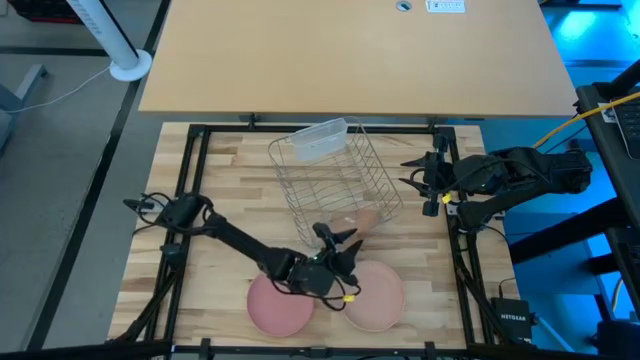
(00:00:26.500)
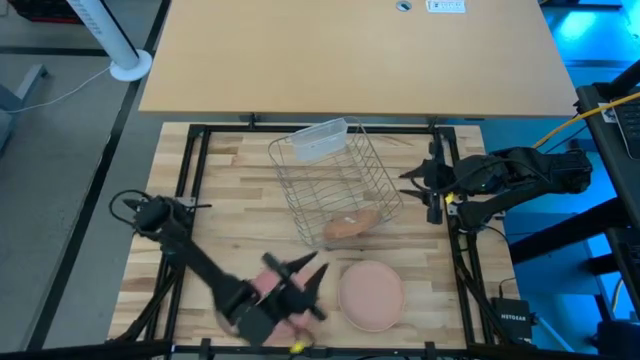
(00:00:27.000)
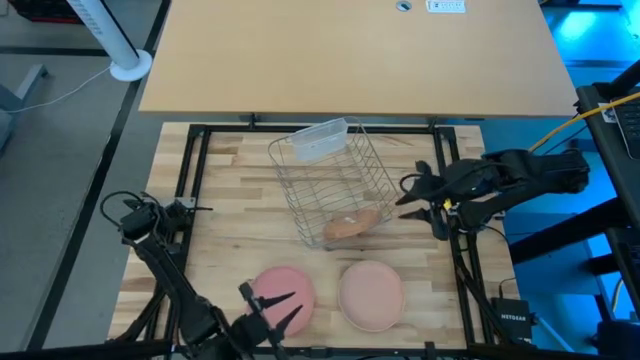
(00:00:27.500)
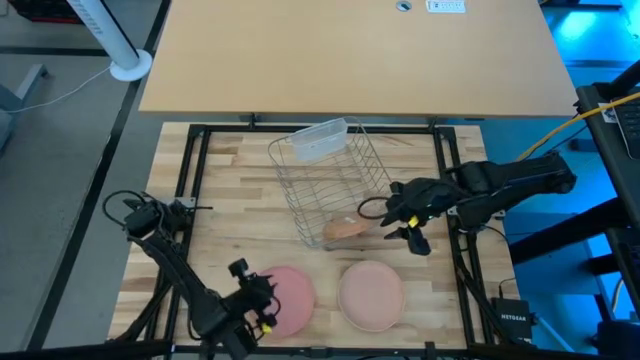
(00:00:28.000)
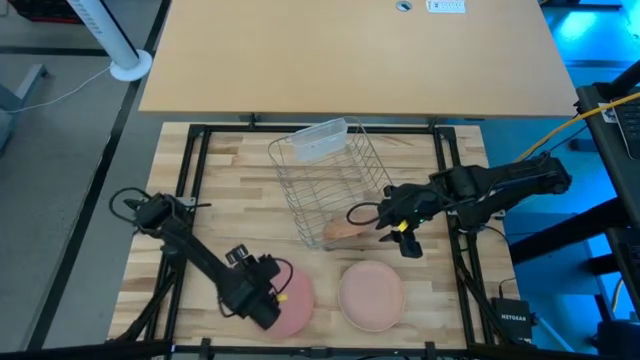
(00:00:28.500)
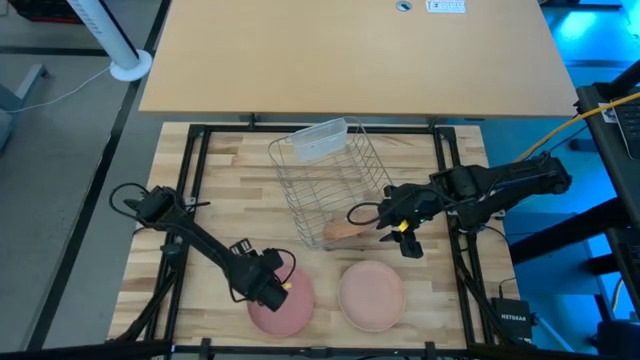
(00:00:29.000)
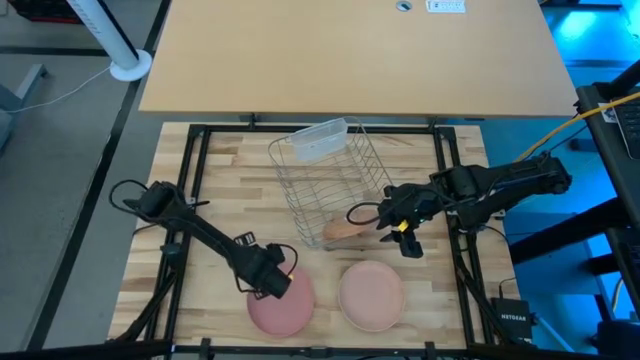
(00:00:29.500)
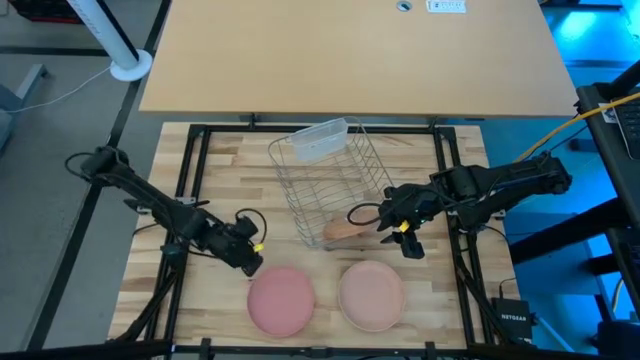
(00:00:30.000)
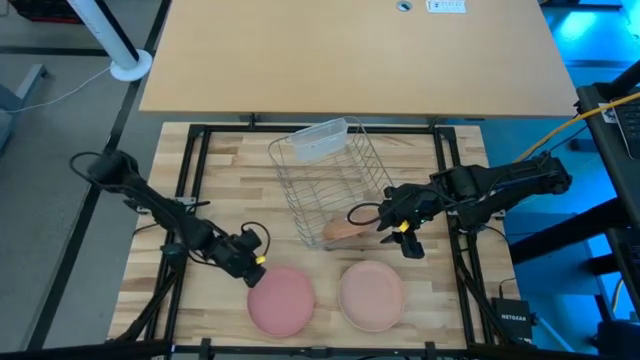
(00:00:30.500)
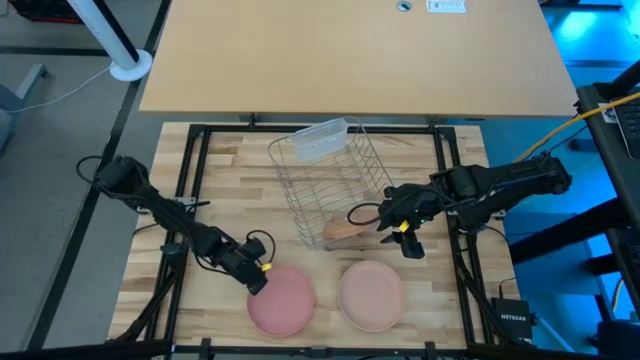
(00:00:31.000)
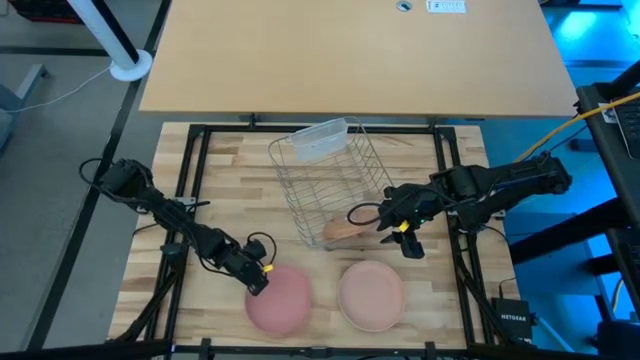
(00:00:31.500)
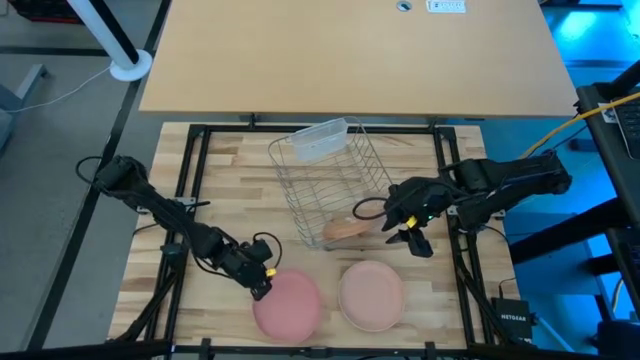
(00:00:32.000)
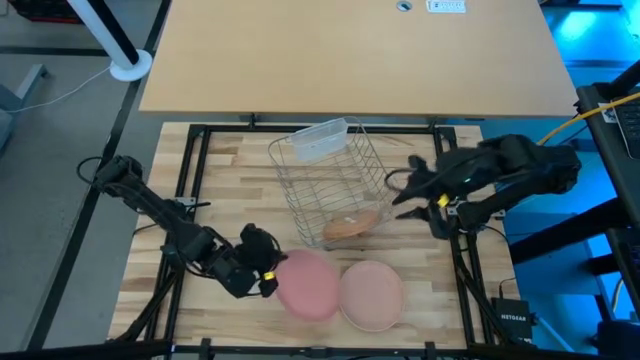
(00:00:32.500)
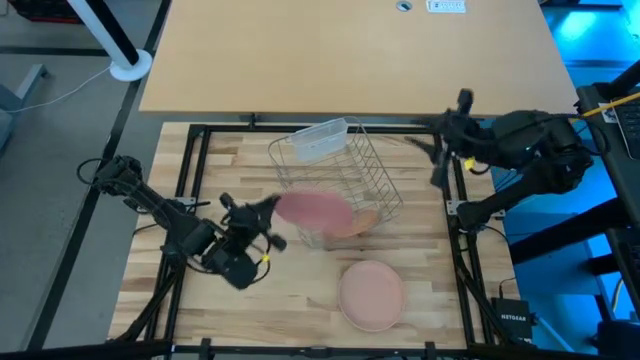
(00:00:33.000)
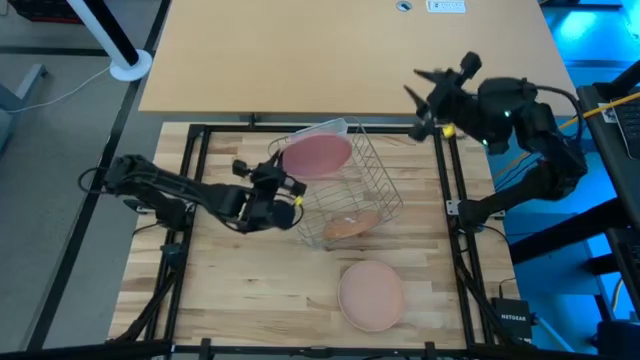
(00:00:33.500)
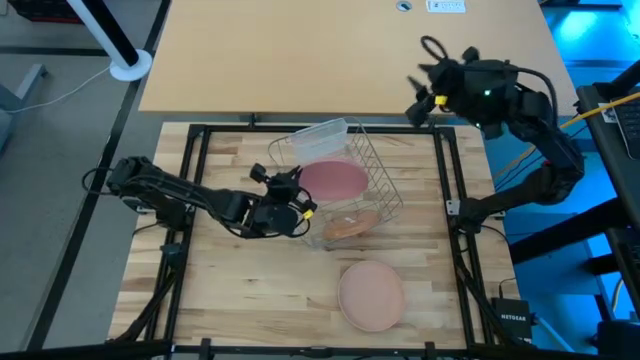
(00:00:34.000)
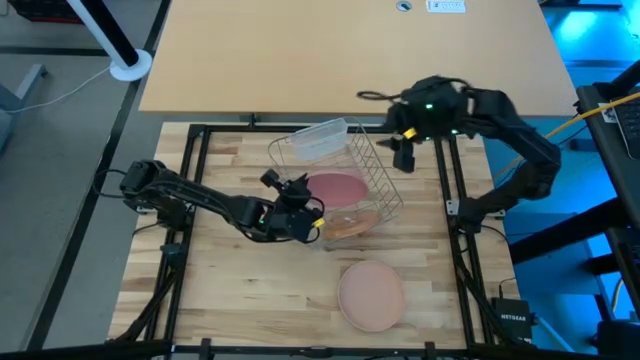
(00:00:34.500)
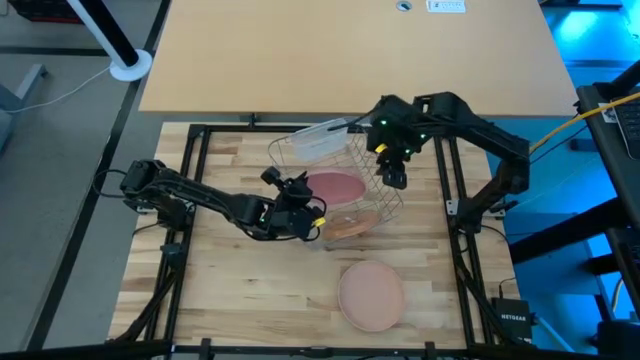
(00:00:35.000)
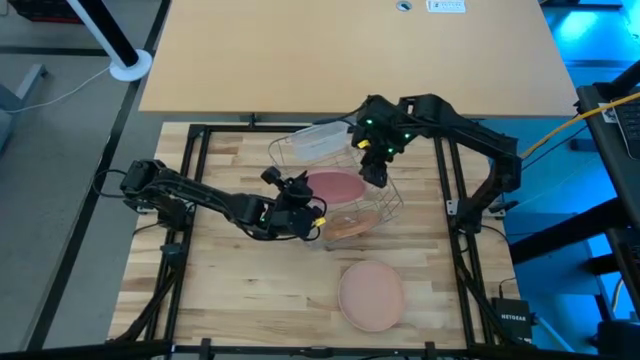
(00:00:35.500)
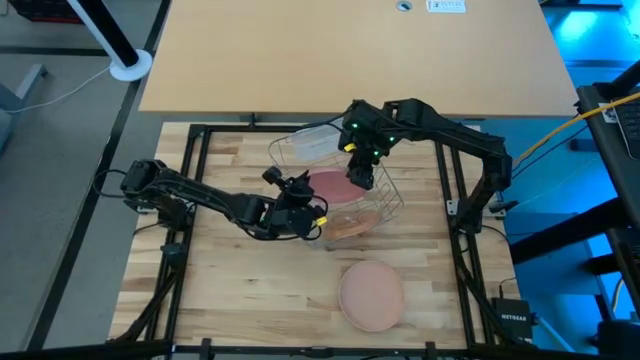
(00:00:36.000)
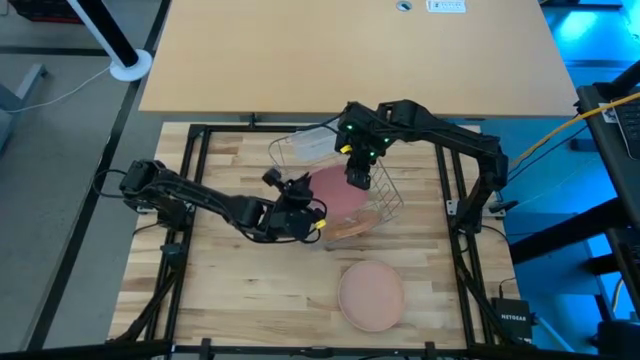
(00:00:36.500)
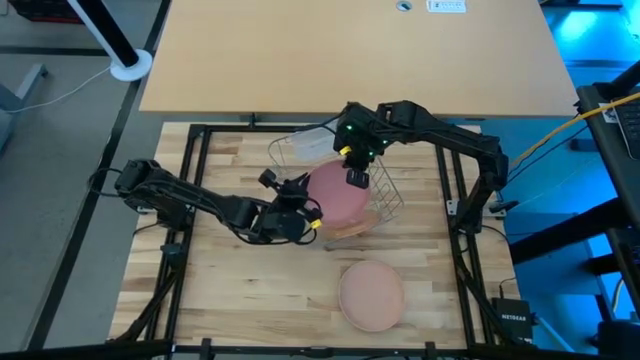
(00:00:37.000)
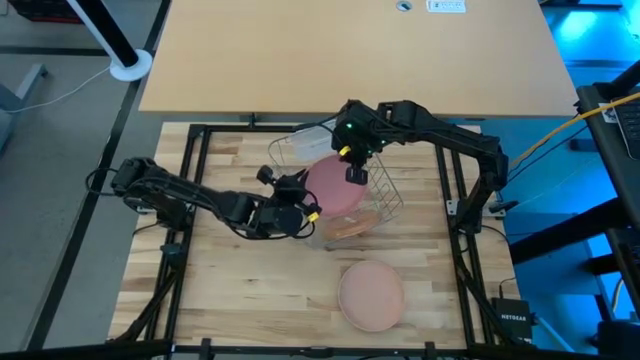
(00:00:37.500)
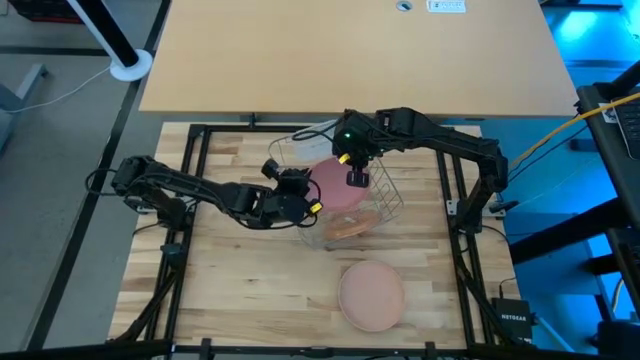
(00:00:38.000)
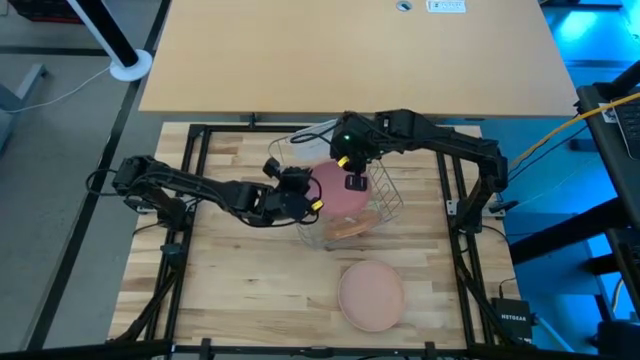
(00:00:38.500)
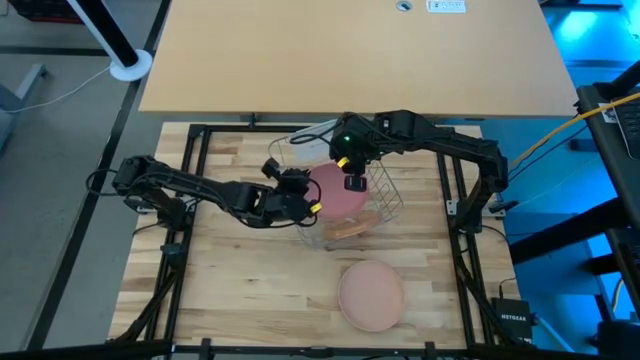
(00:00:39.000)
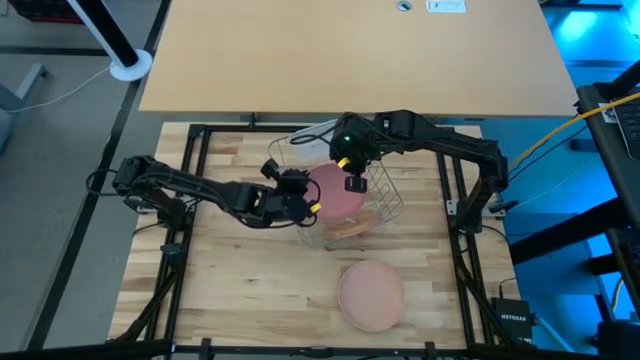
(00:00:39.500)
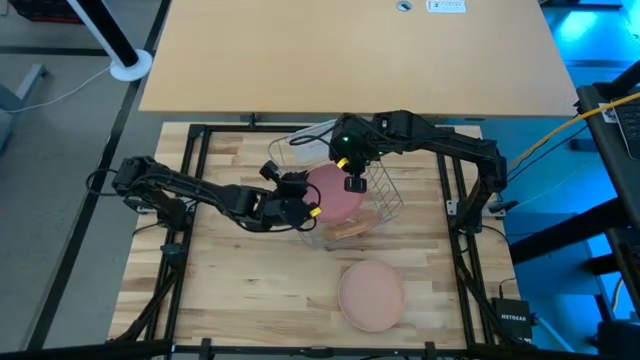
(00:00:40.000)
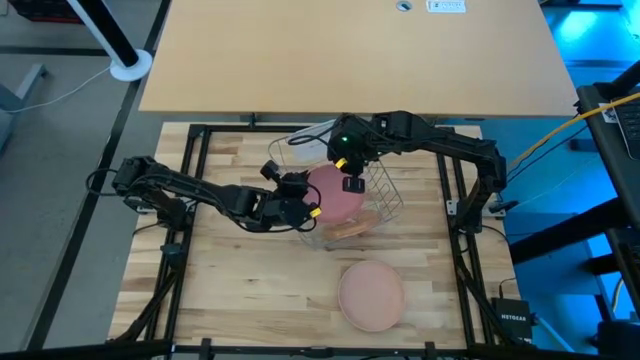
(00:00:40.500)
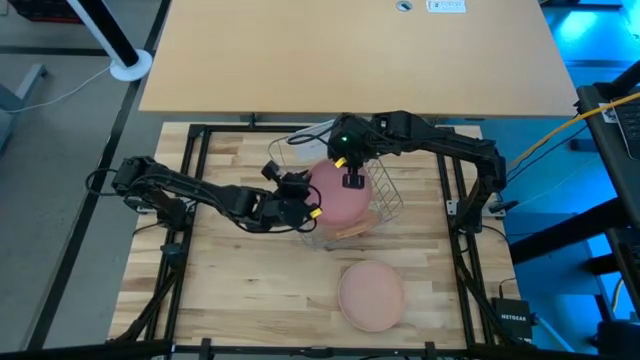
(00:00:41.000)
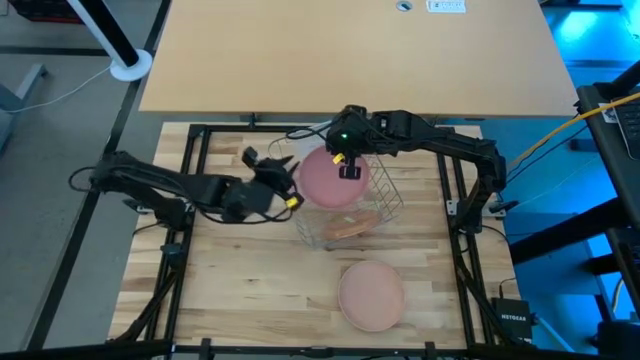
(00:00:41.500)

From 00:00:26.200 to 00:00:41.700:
Task: Sort dishes
Put the light pink plate in the dish rack

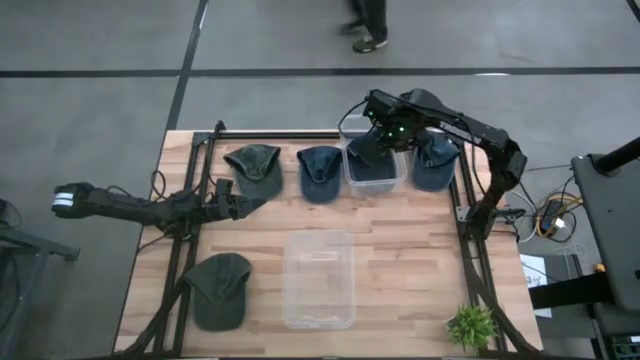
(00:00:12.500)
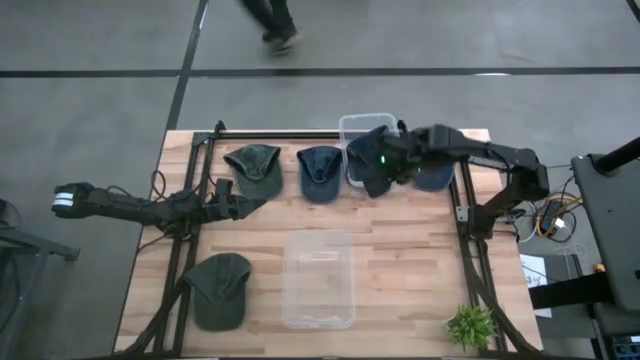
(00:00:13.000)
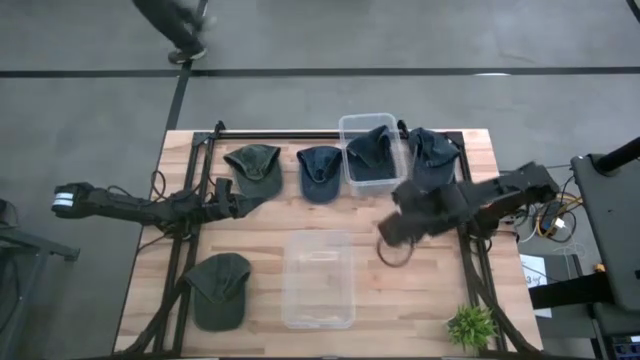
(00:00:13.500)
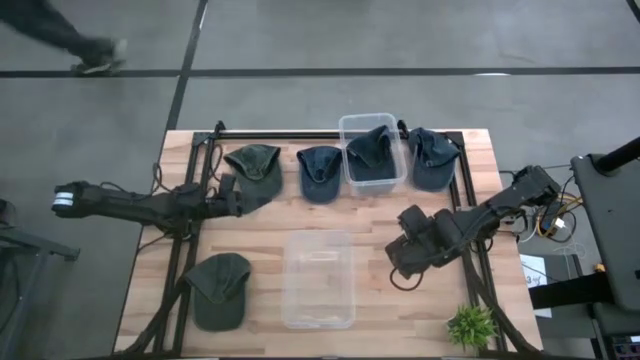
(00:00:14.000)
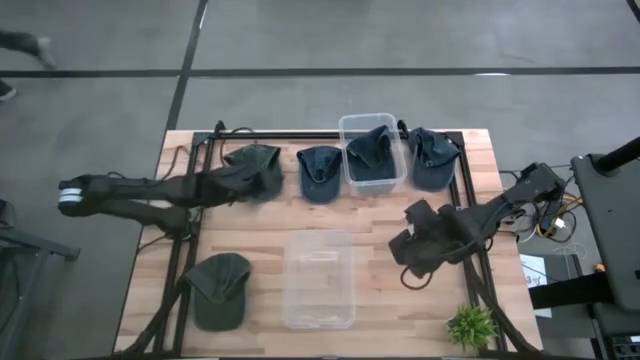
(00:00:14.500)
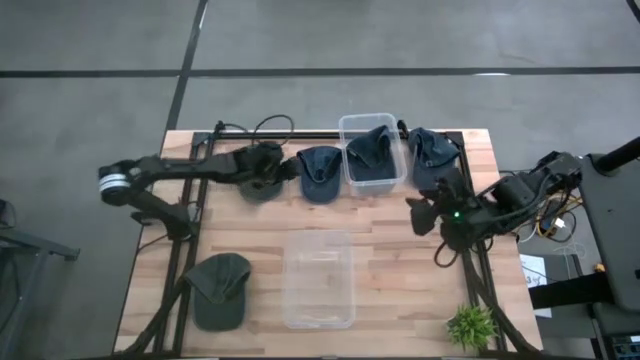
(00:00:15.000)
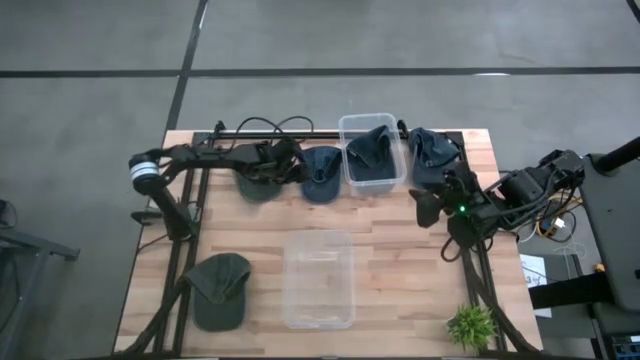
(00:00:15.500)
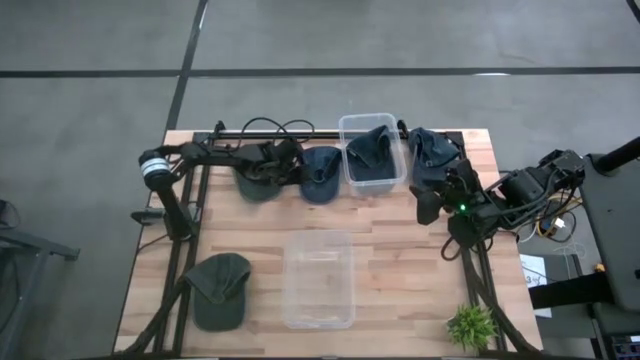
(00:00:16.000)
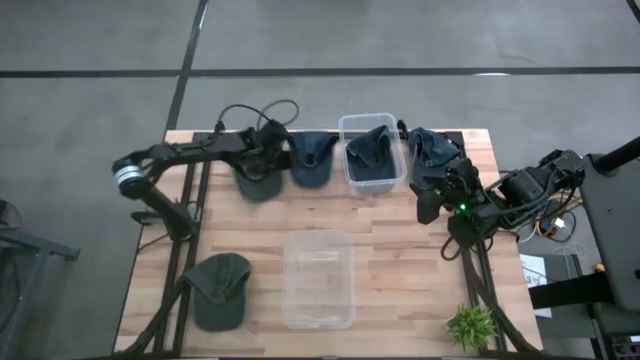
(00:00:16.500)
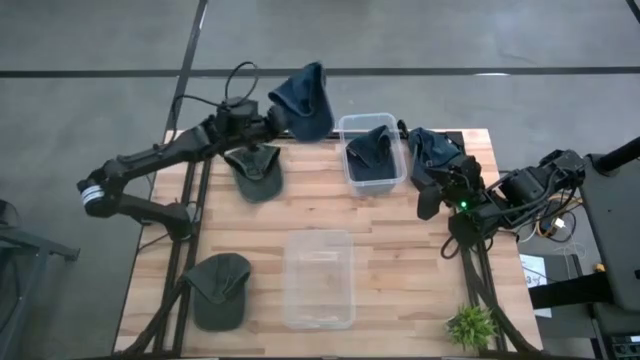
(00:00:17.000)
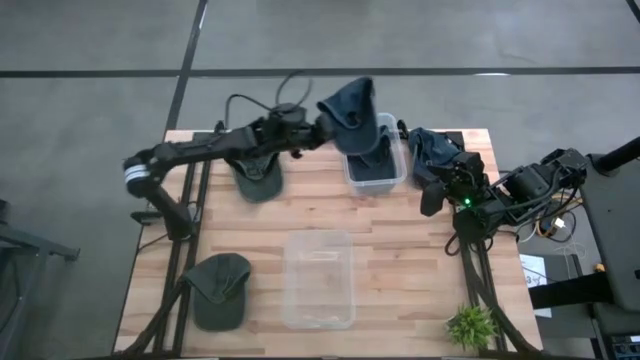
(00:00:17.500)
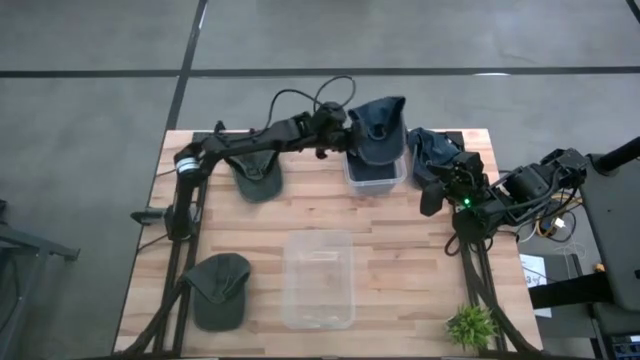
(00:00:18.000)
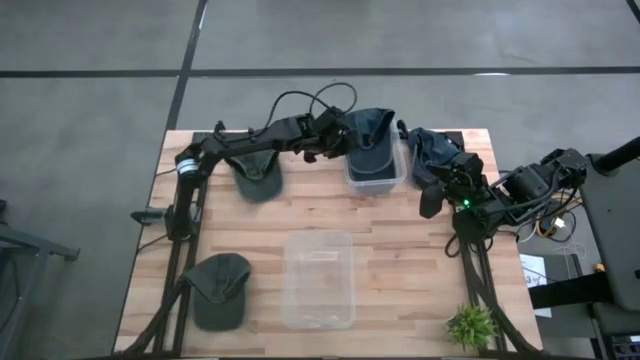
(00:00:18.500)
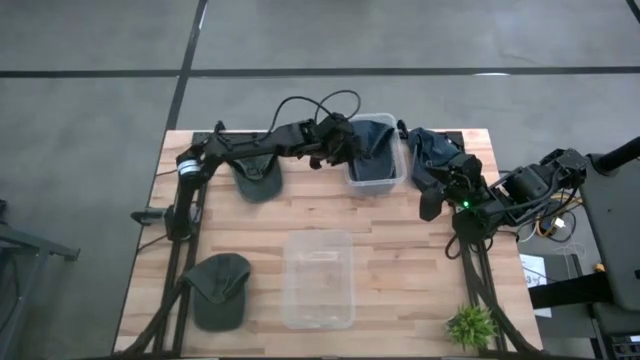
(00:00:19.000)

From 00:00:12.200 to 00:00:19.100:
Task: Pick & Place hat
Put the left blue cap into the top transparent bin
